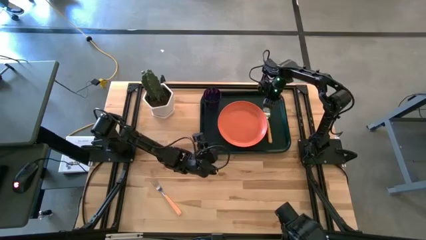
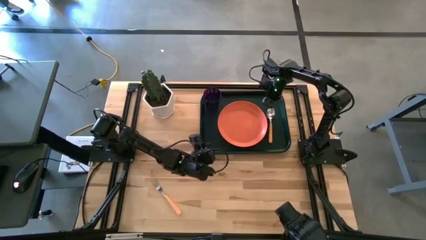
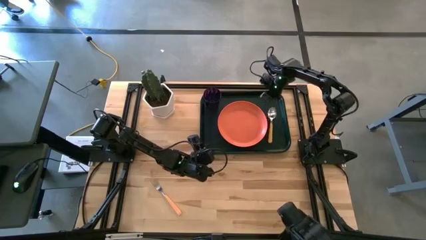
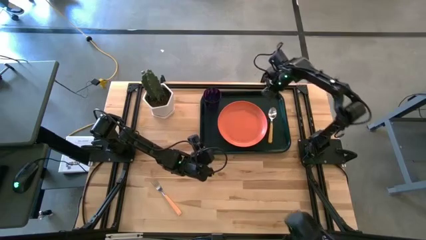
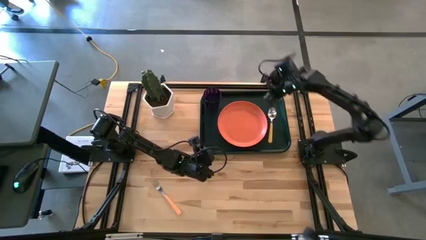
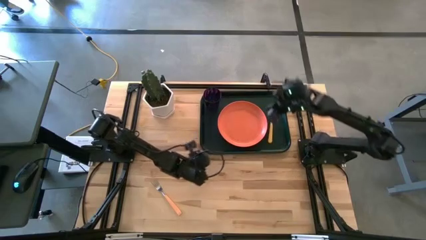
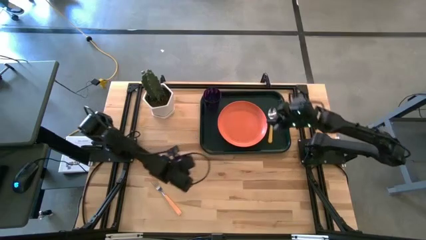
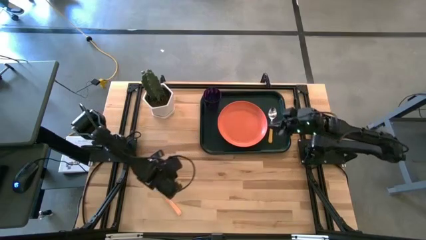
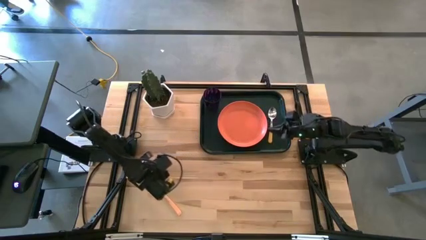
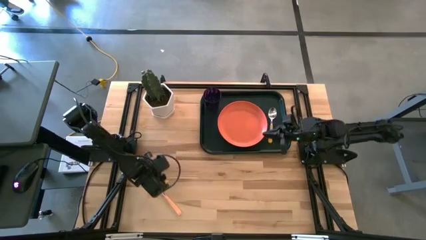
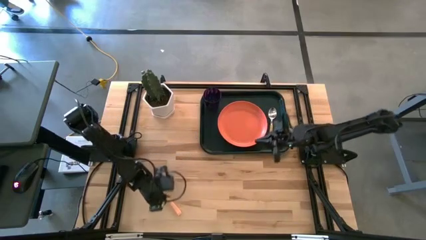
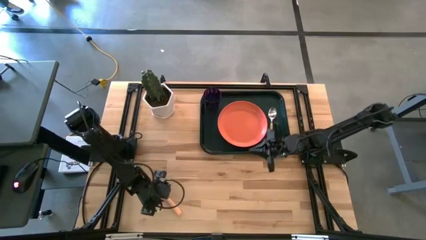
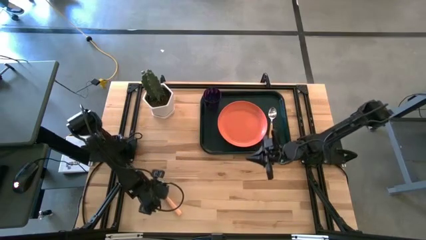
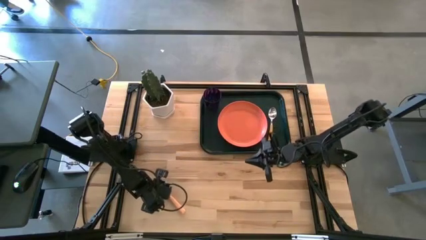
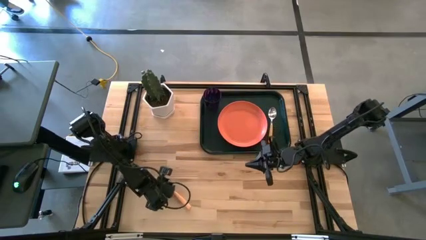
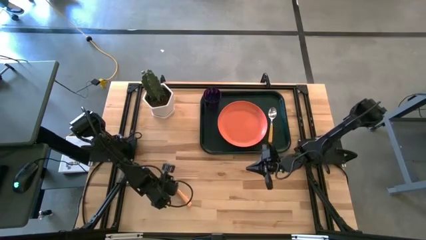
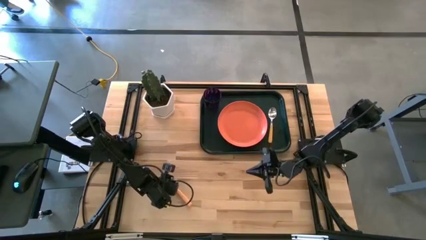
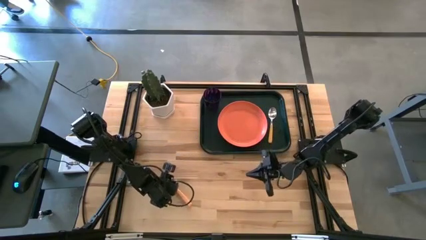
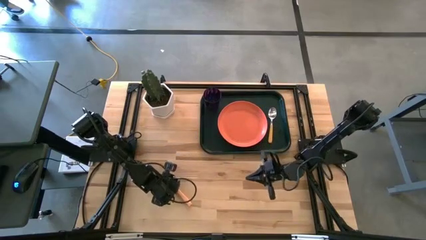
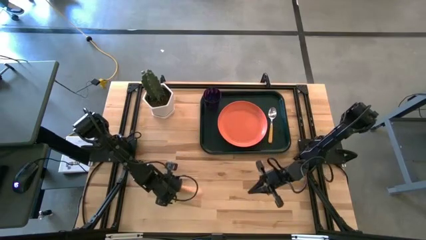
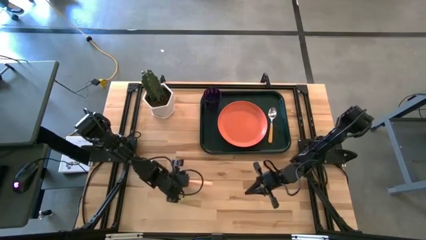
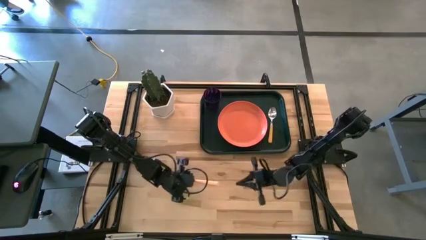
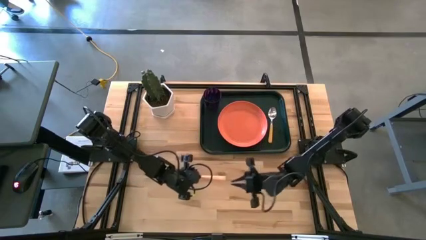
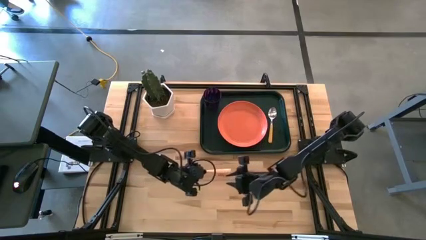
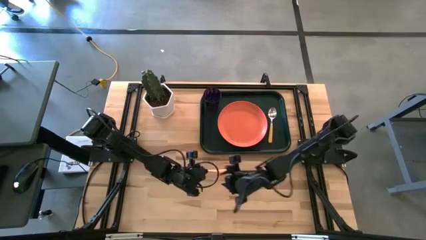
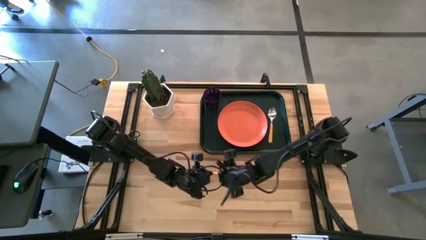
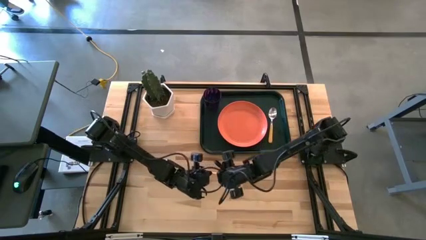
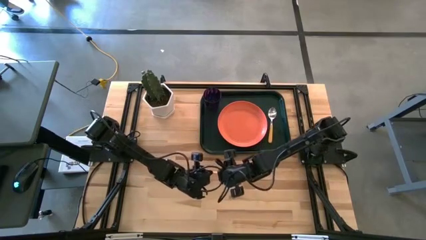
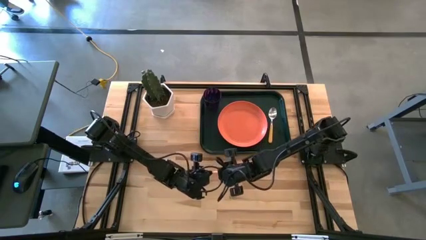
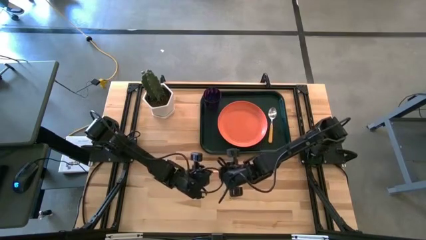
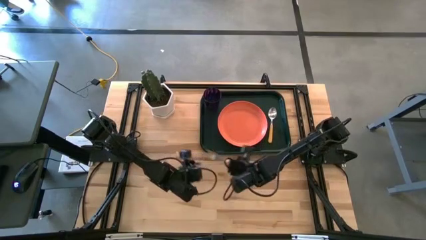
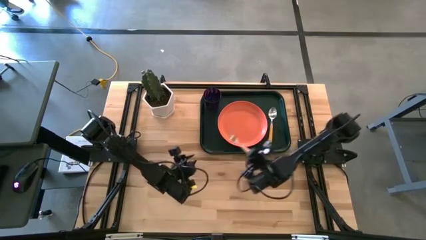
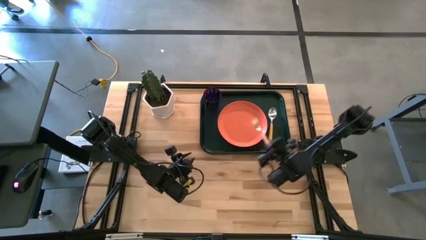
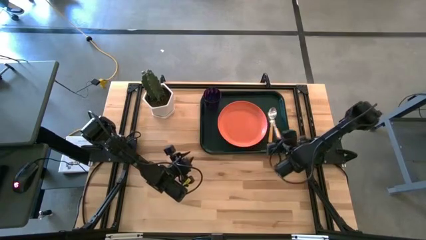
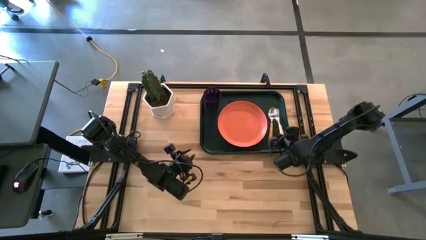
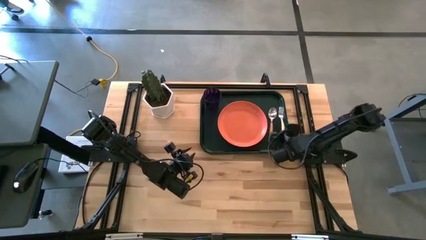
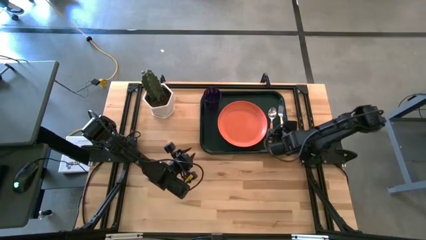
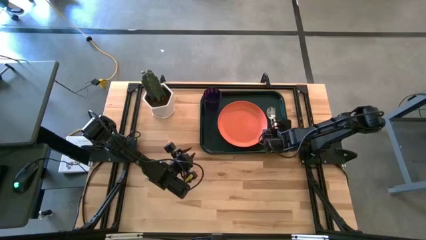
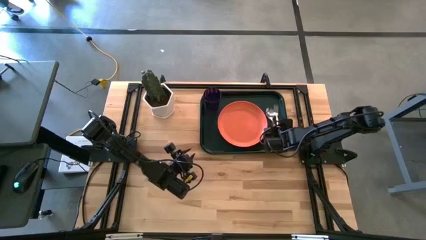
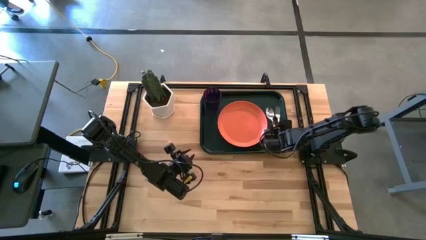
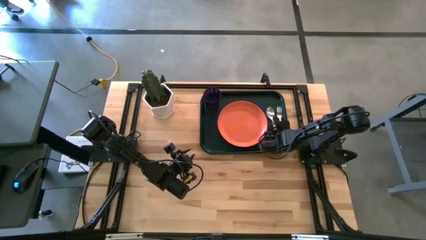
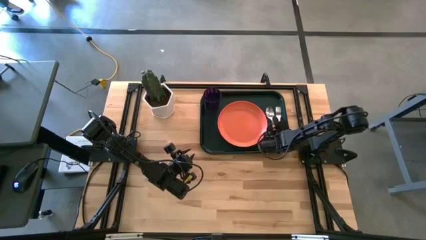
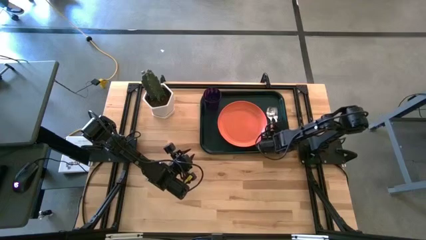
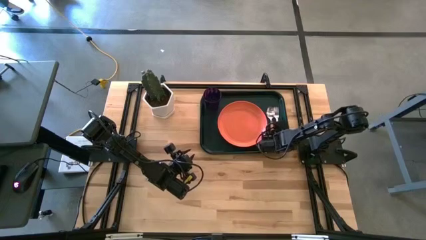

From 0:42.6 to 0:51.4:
Task: Pick and place plate/cup/fork/spoon on tray
Put the brown fork on the black tray to the right of the yellow spoon

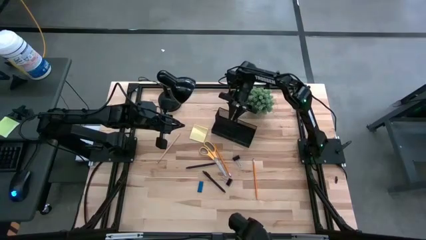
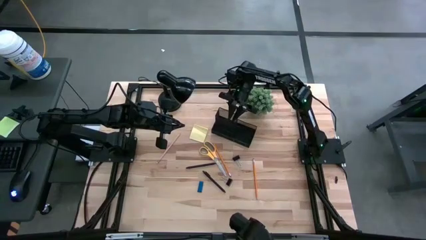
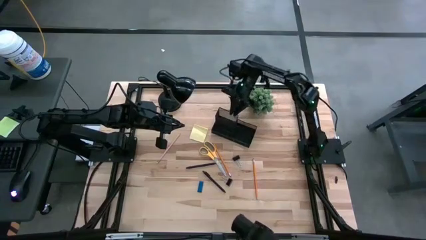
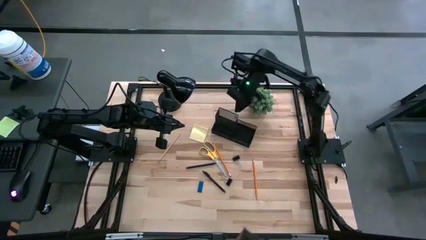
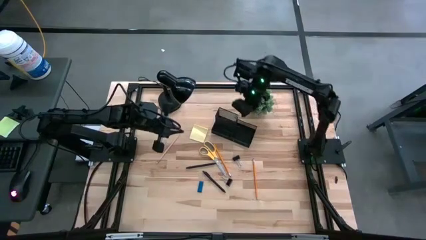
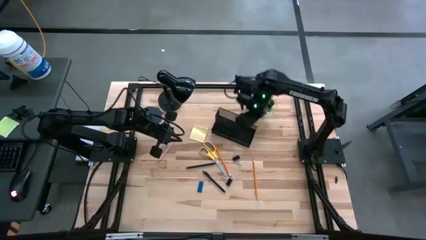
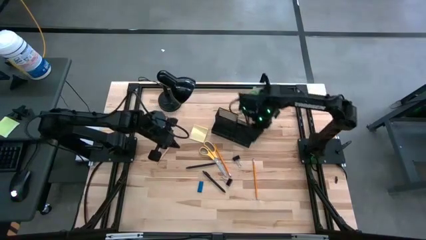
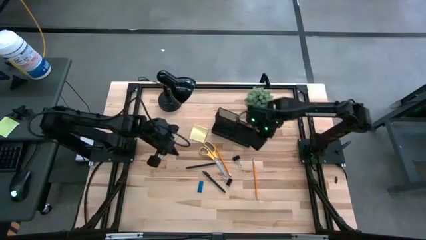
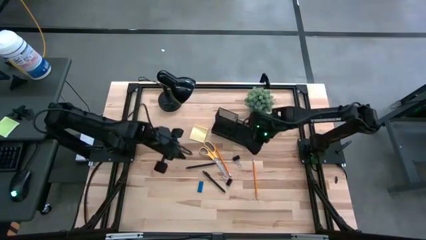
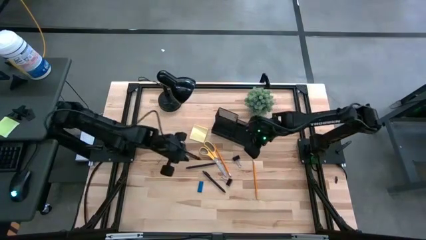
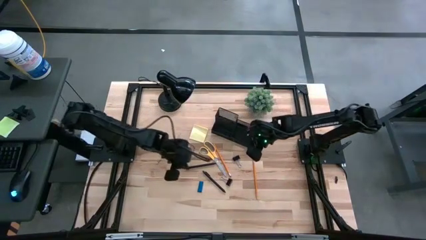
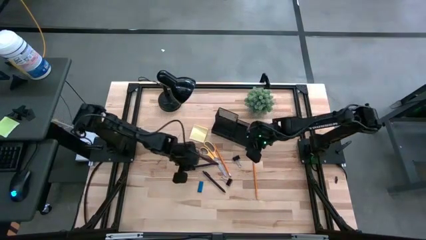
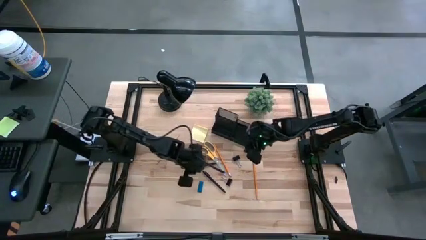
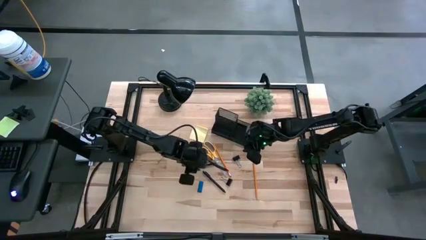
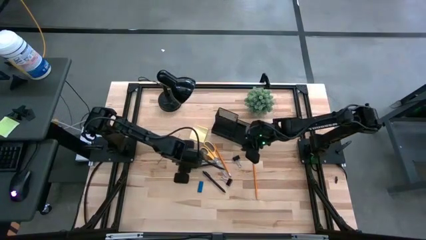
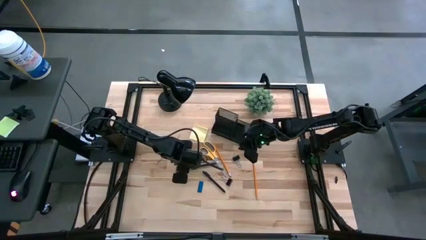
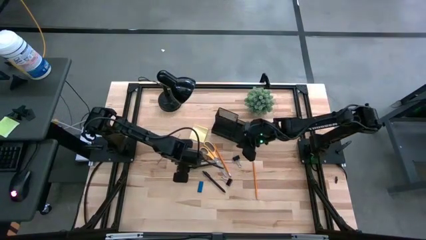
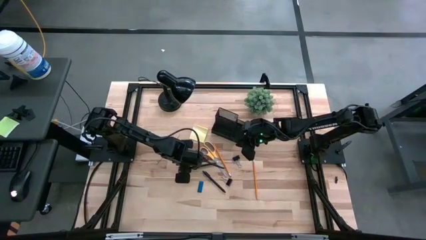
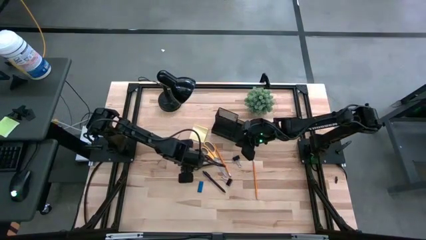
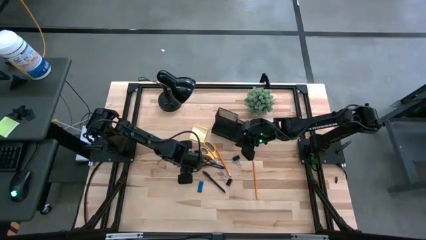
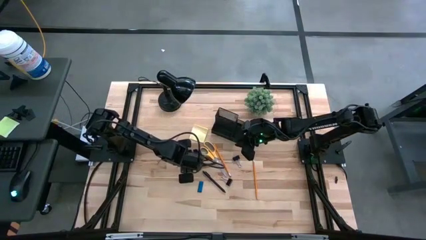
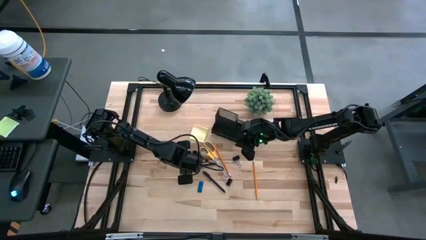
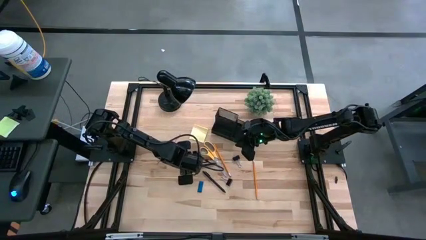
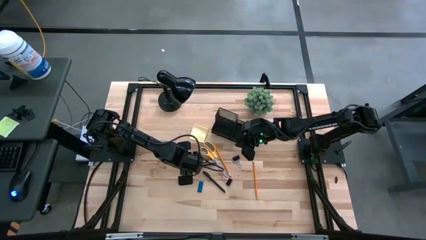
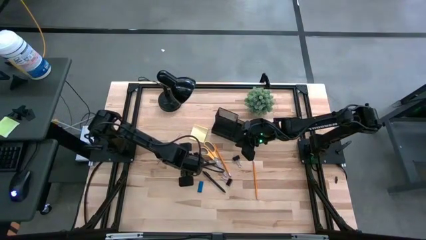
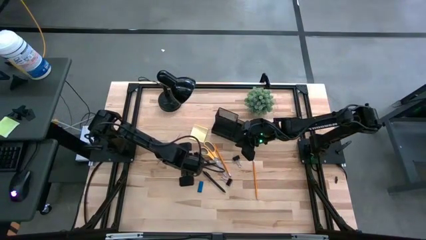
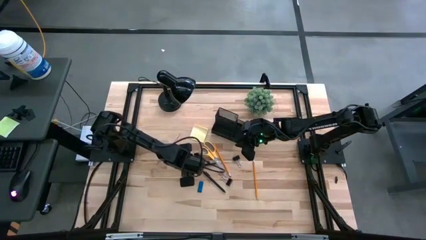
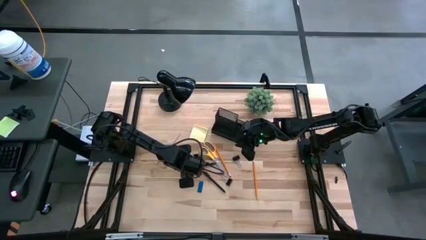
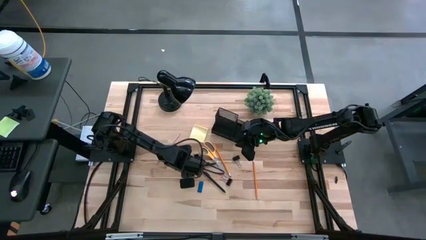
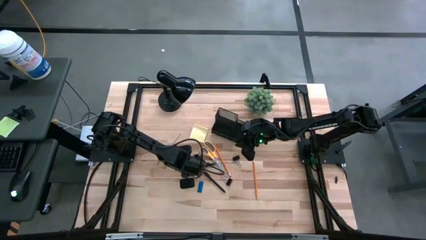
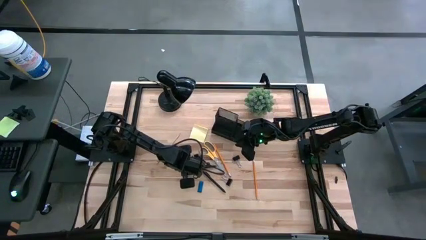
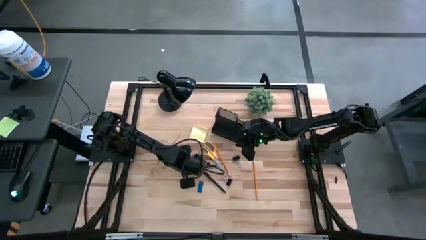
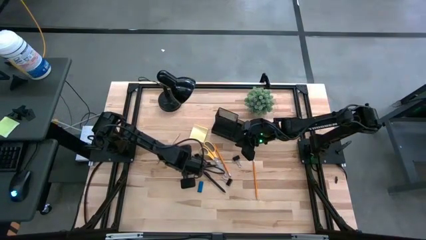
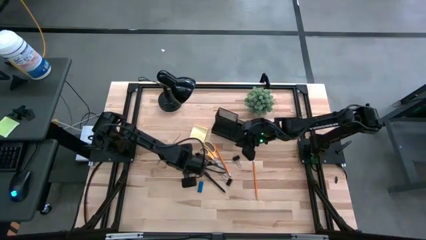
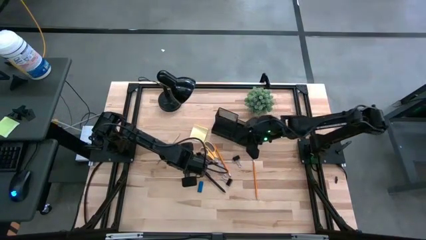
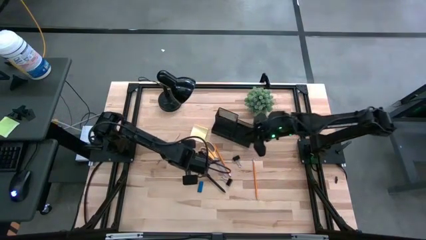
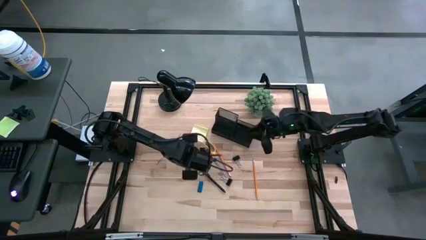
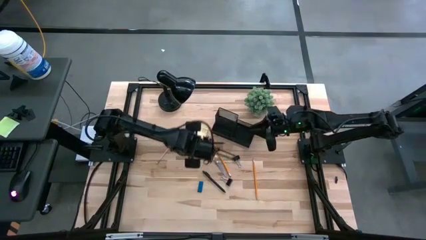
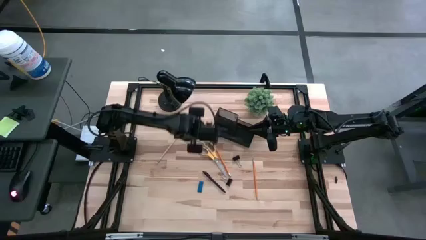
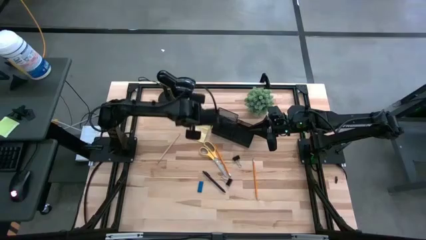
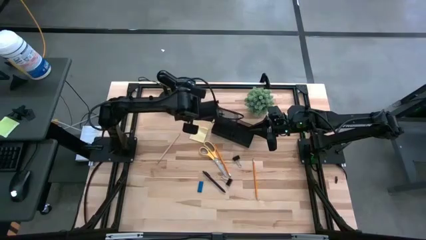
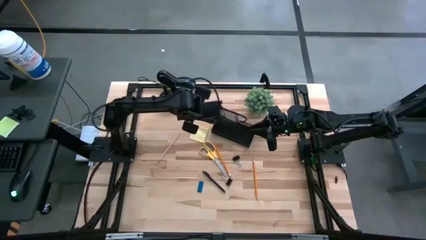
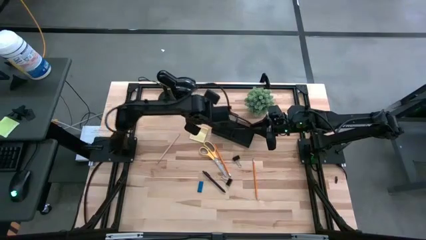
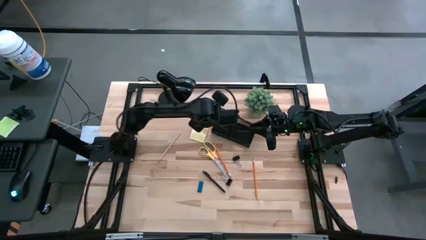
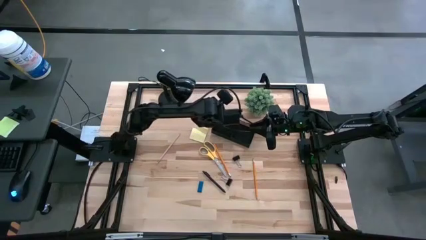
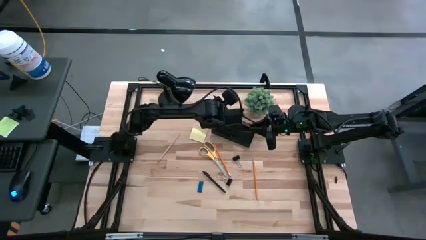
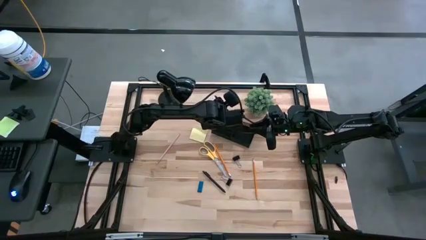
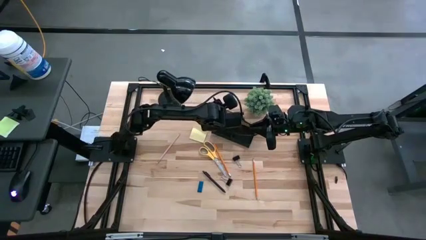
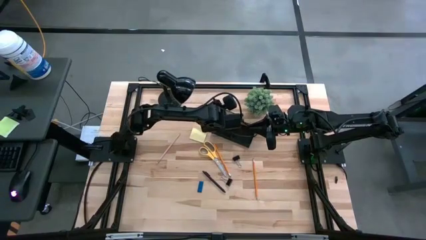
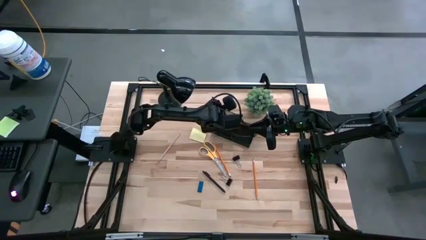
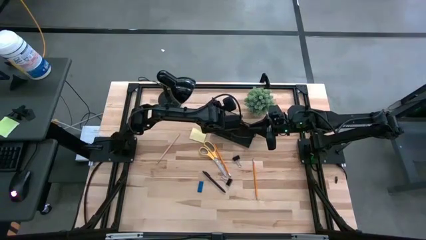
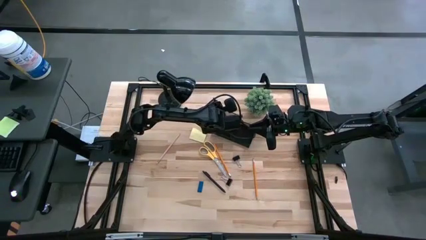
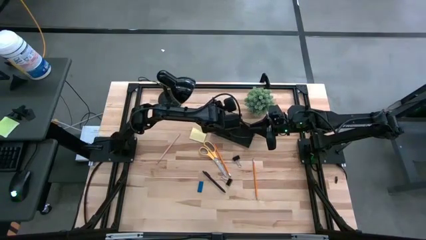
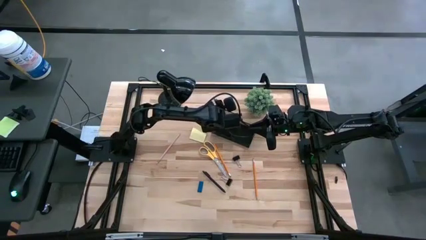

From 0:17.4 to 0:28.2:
Task: Pick and place office supplies into organizer
Put the top pen into the desk organizer
